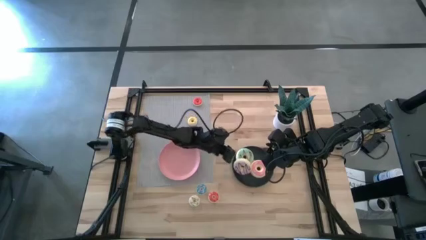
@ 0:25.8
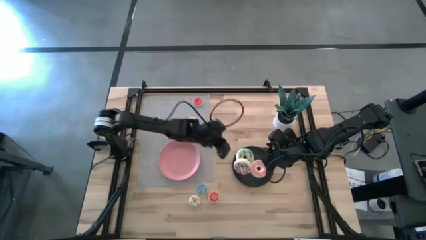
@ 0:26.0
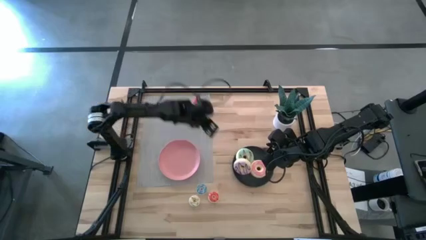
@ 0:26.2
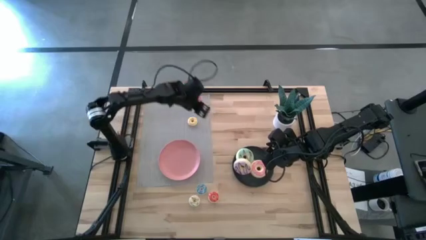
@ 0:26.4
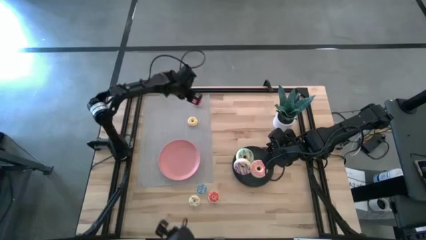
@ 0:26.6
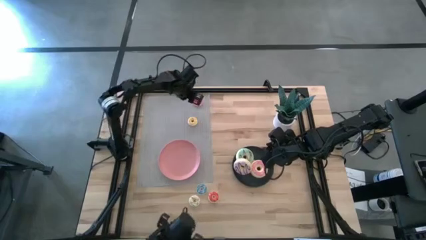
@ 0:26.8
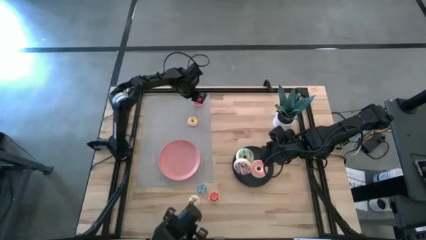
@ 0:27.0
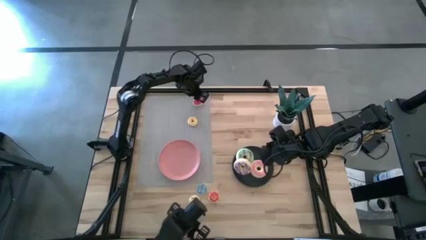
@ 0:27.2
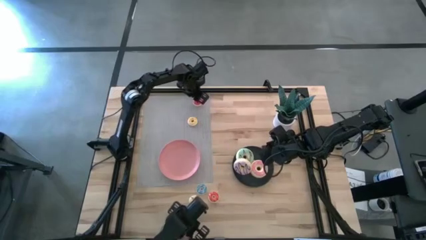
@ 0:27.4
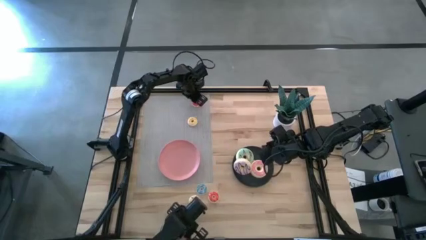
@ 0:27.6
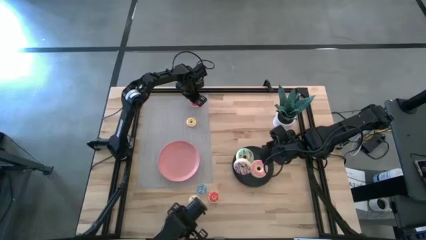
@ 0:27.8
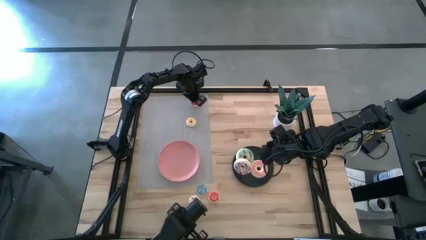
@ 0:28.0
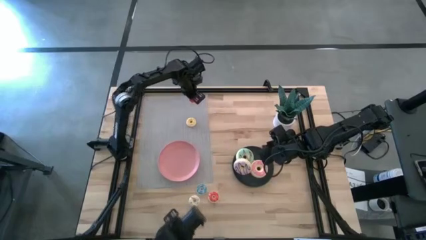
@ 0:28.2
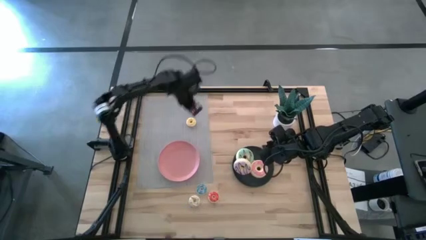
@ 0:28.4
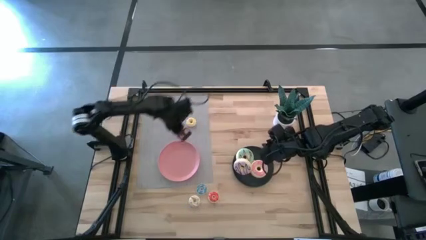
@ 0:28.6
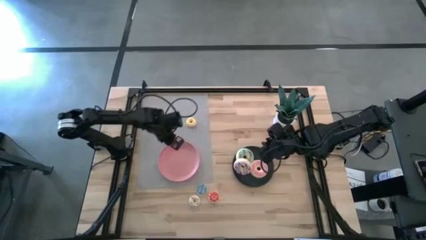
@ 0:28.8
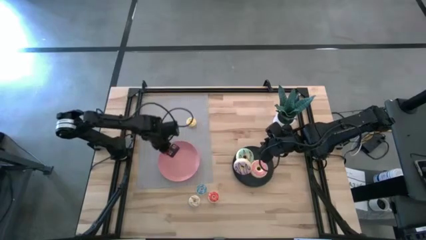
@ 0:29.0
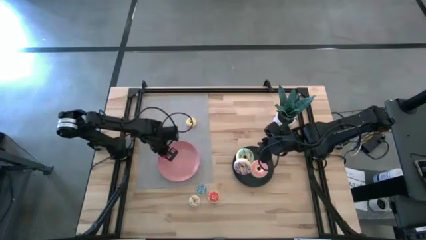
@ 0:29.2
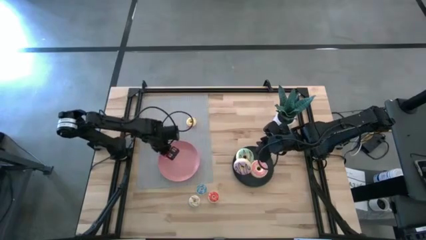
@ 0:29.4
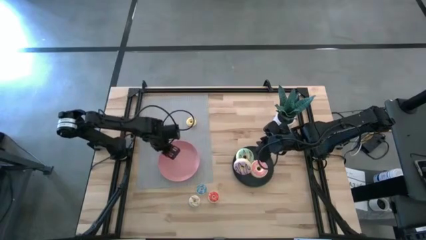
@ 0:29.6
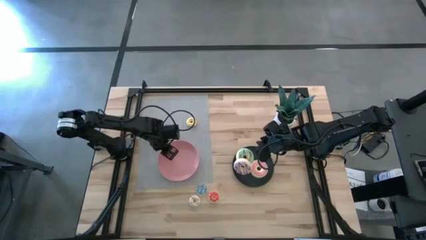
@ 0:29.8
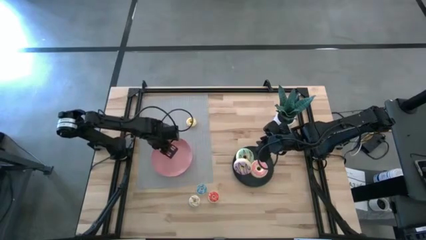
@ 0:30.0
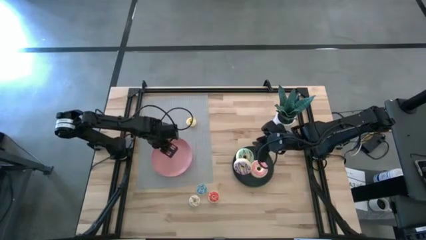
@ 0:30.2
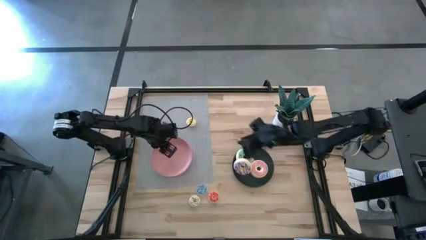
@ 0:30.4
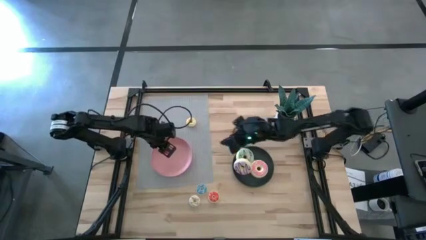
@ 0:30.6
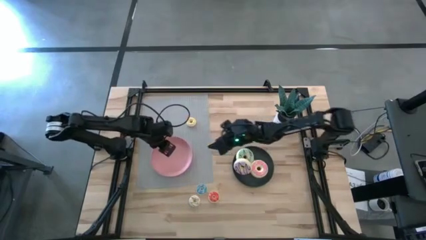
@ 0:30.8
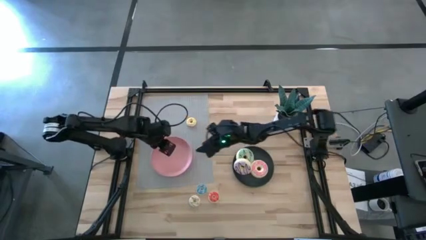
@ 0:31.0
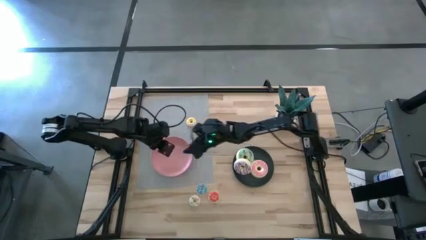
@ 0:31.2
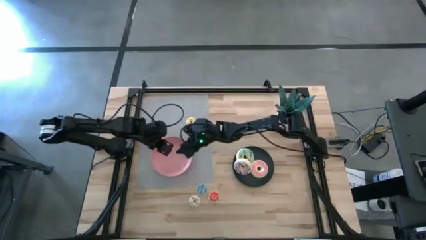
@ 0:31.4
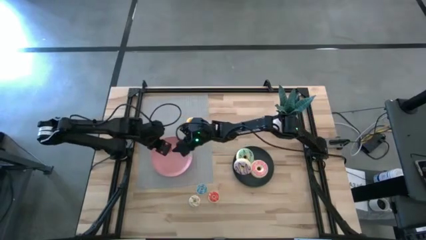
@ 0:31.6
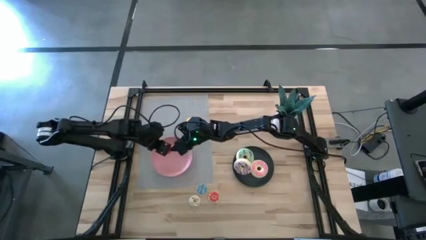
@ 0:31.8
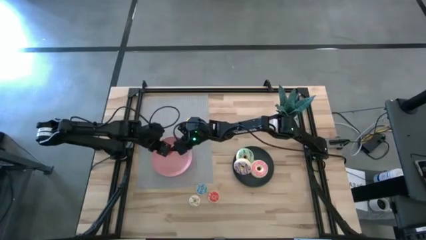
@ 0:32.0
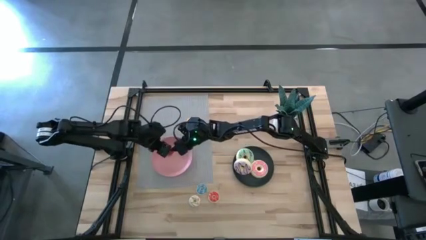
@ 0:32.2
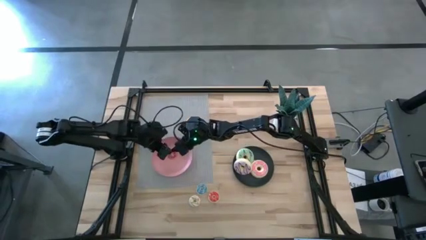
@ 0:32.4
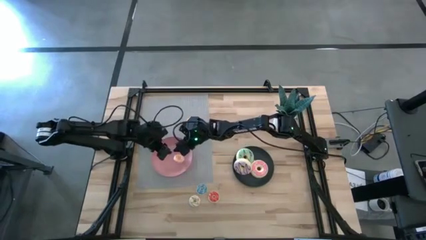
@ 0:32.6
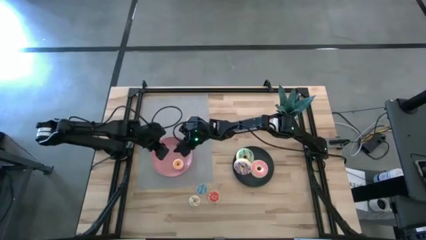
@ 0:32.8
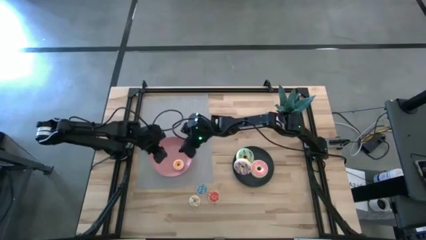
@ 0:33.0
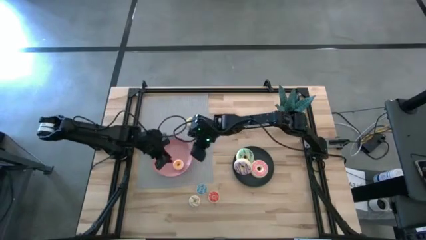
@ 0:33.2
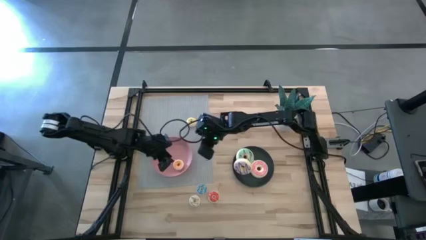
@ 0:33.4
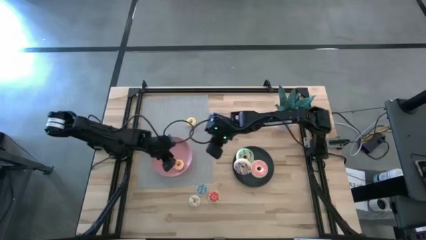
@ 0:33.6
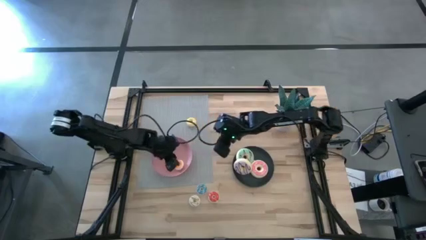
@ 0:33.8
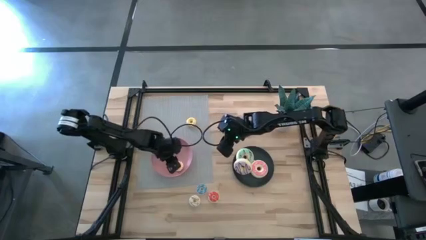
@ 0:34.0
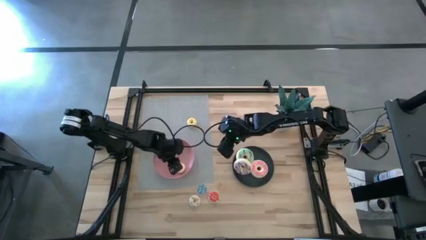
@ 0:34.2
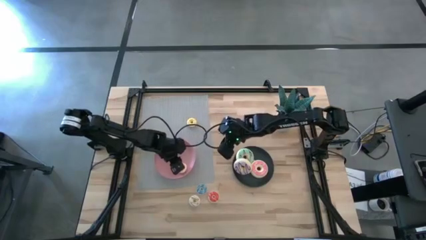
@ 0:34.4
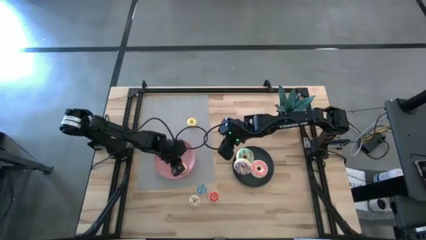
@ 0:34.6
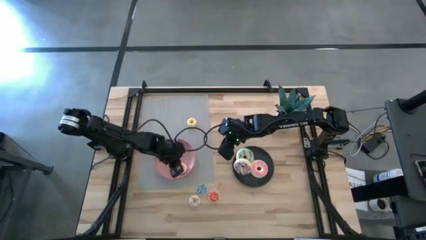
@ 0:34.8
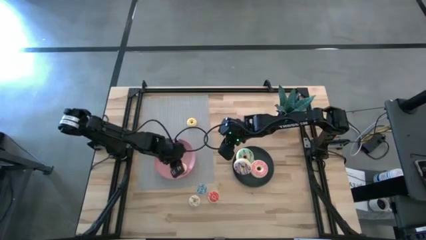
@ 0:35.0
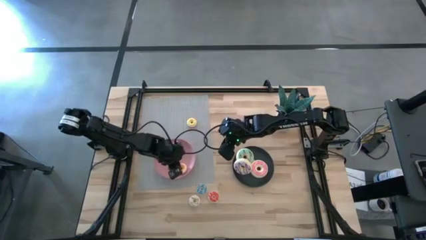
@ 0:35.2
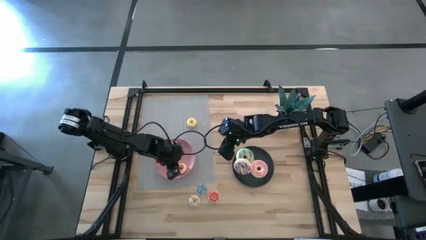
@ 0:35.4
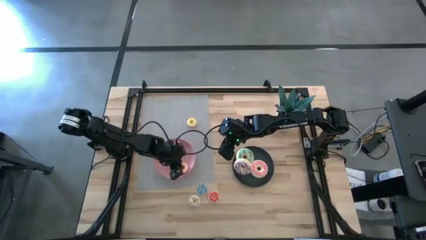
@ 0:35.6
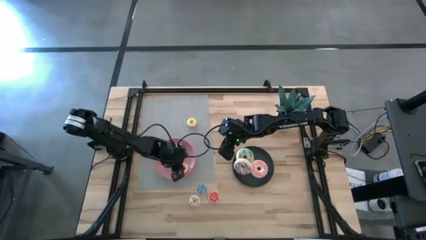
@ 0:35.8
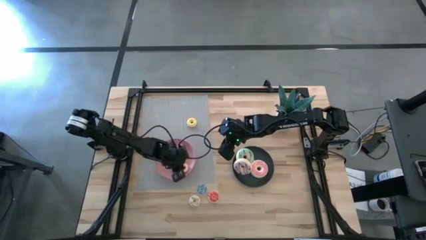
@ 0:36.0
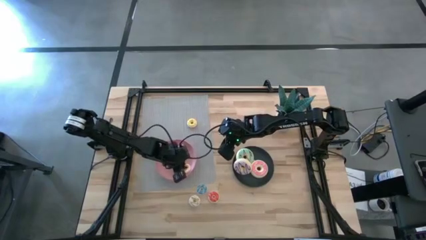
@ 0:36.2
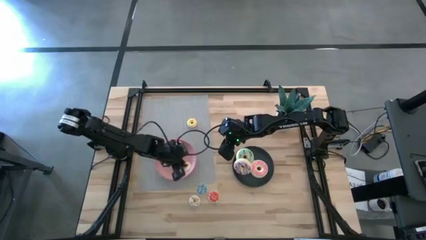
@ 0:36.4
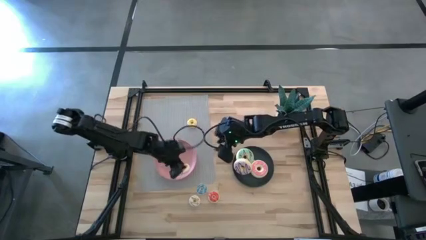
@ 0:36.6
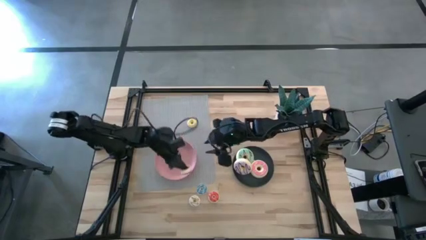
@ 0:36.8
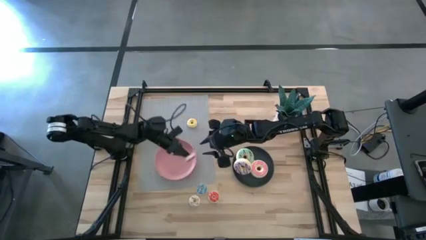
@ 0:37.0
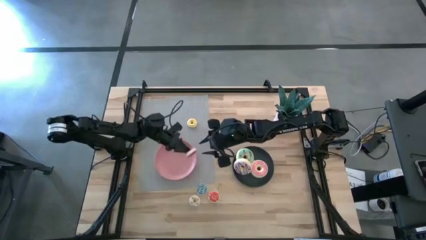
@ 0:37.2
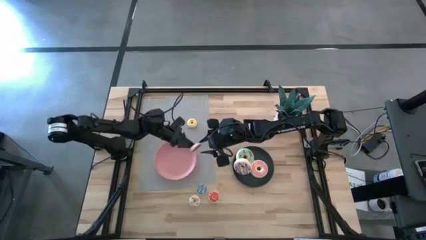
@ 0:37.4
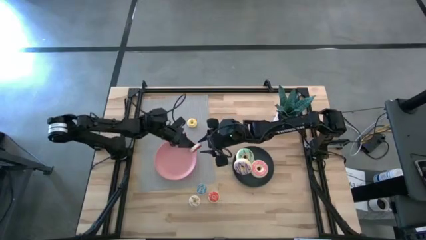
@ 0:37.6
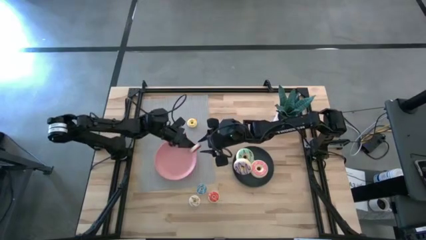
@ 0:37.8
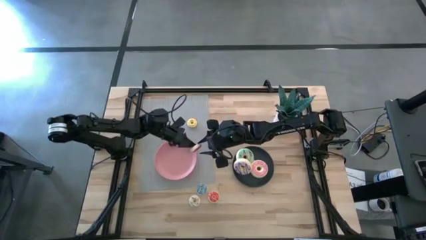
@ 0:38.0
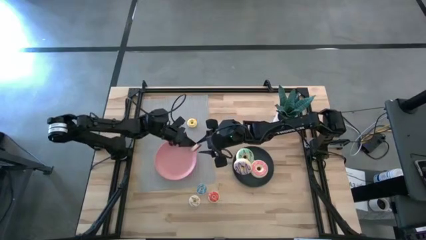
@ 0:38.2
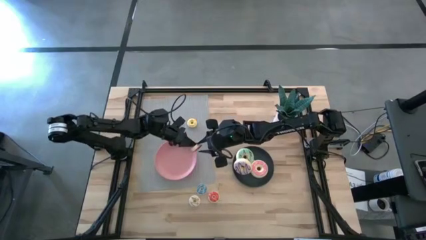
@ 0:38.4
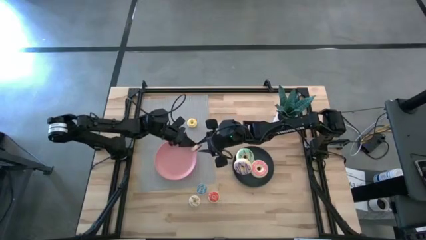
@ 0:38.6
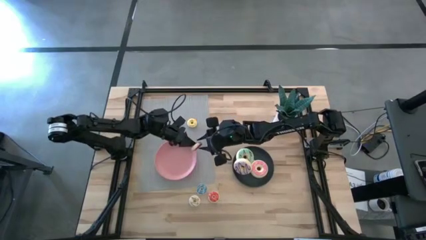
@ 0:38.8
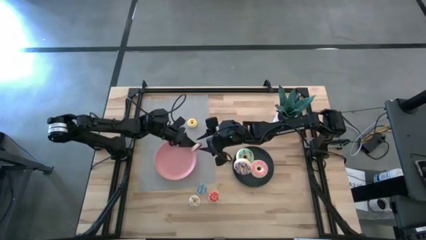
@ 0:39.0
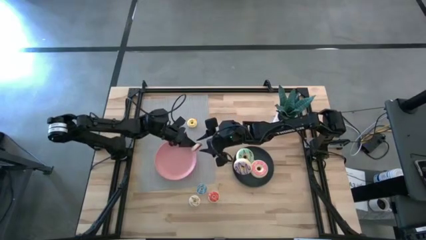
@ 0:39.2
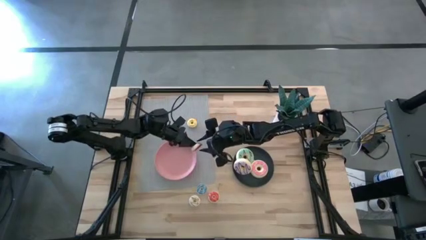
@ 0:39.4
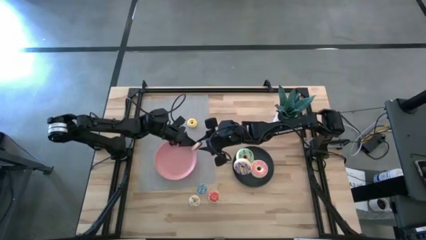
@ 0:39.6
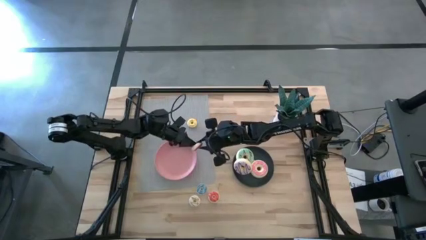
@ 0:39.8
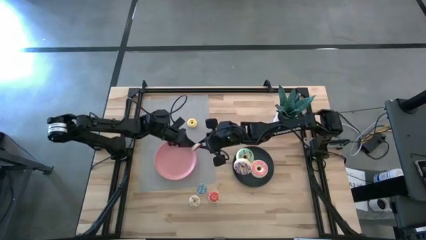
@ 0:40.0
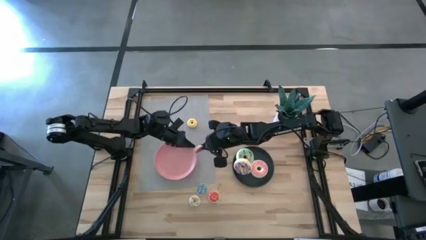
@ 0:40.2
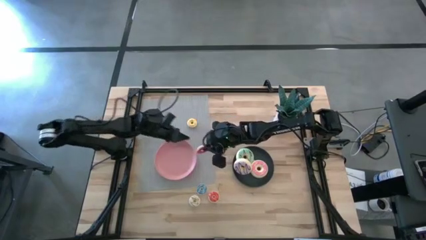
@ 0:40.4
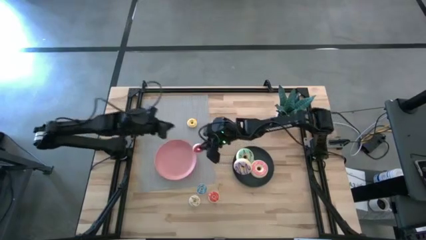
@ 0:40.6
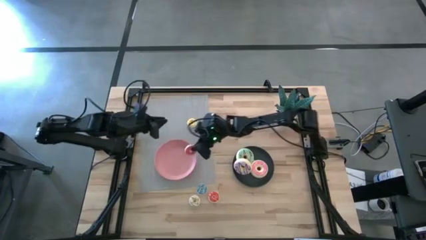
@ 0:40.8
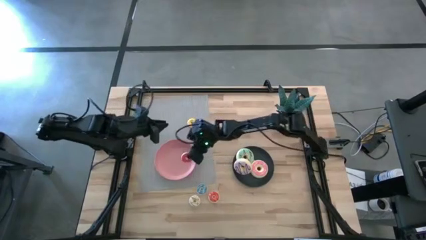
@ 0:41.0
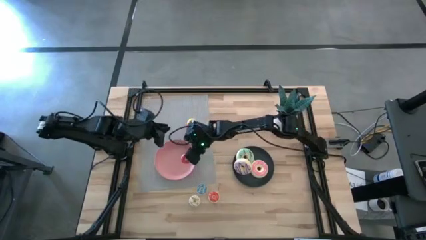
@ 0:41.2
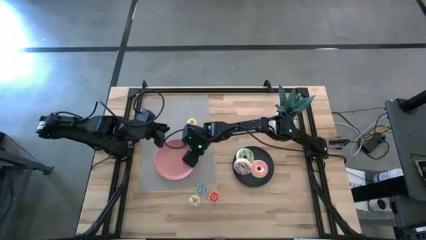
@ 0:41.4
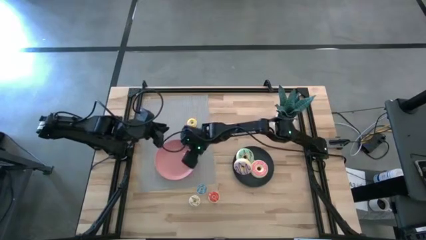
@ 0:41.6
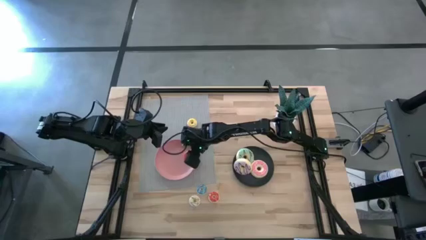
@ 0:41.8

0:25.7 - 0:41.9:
Task: Pick & Place donuts
Put the small red donut on the pink plate
